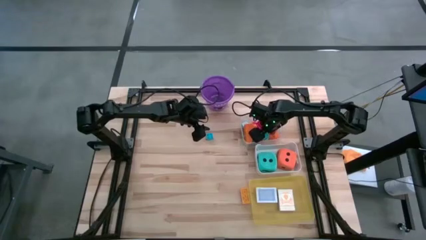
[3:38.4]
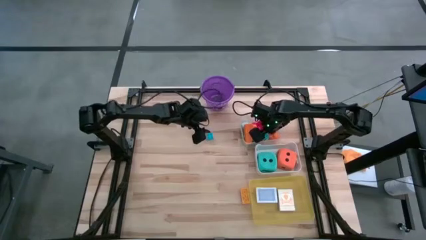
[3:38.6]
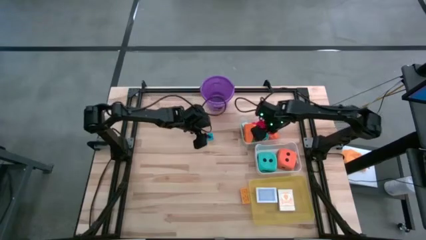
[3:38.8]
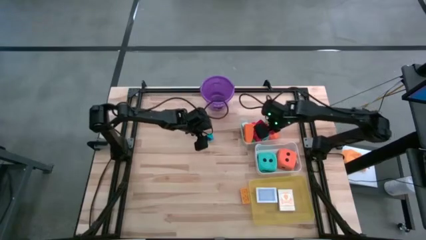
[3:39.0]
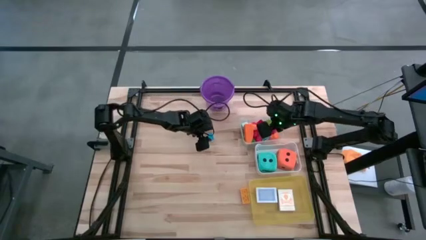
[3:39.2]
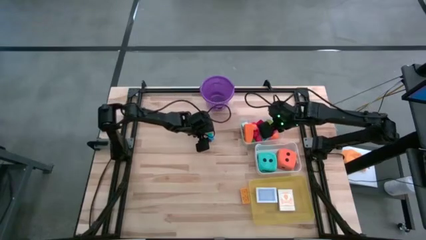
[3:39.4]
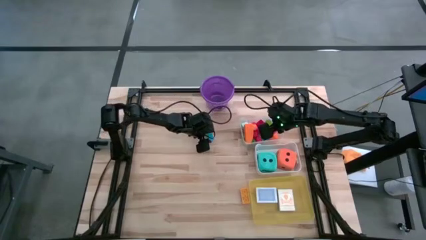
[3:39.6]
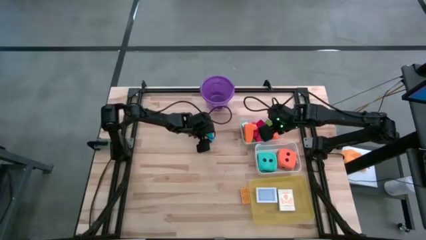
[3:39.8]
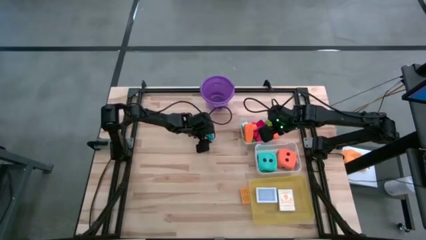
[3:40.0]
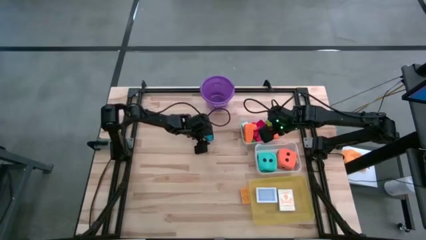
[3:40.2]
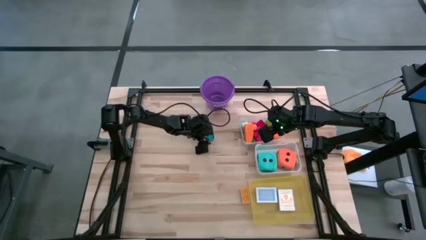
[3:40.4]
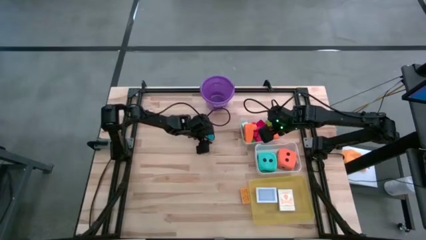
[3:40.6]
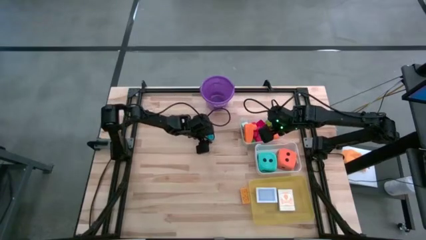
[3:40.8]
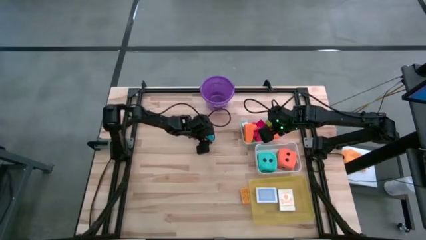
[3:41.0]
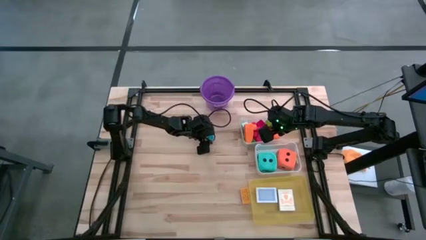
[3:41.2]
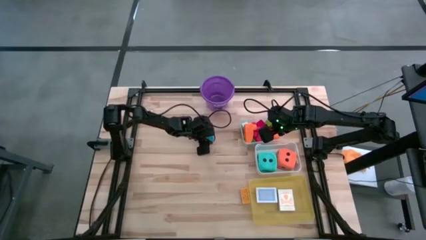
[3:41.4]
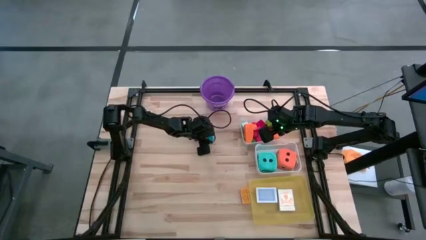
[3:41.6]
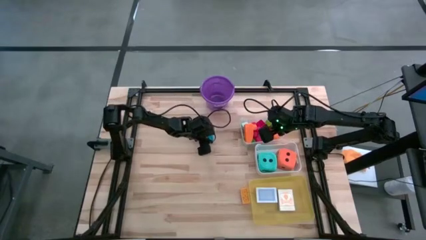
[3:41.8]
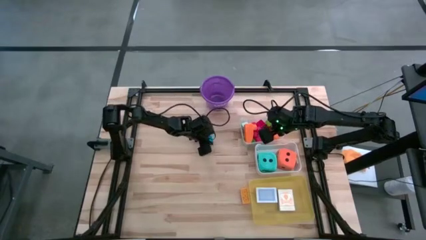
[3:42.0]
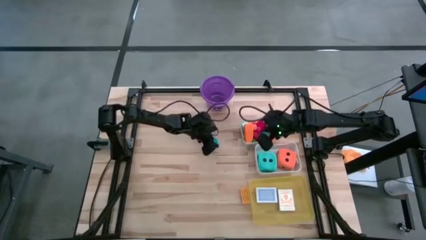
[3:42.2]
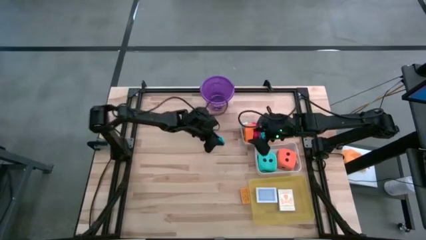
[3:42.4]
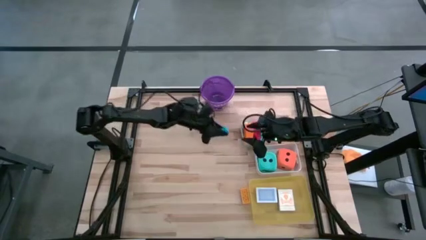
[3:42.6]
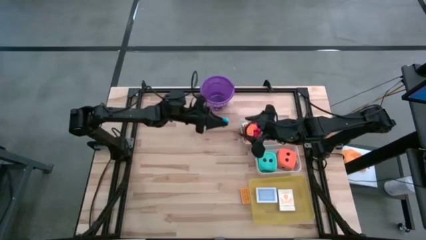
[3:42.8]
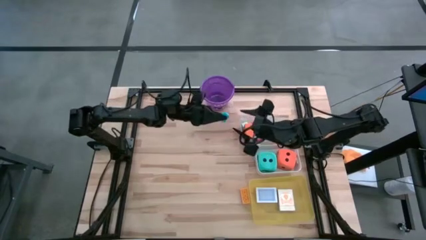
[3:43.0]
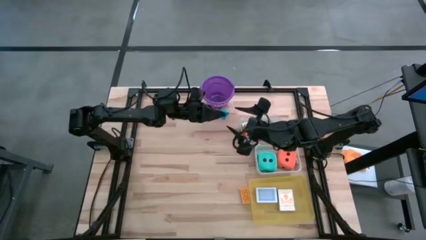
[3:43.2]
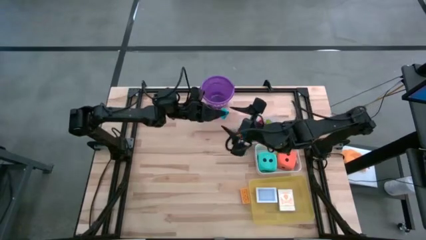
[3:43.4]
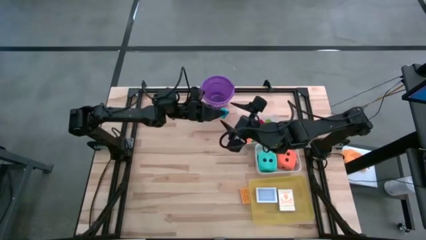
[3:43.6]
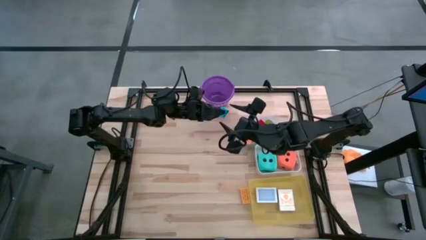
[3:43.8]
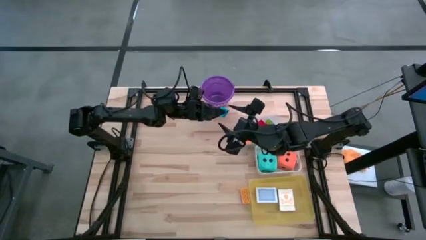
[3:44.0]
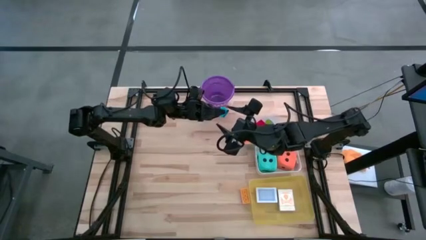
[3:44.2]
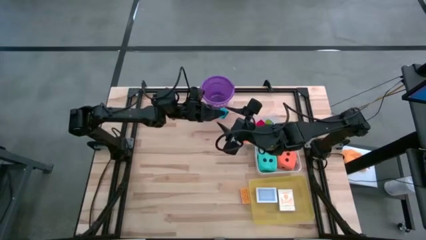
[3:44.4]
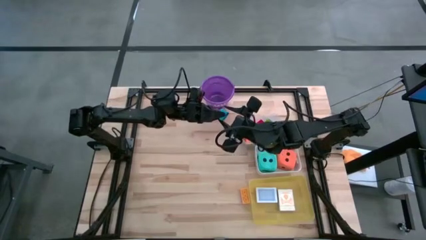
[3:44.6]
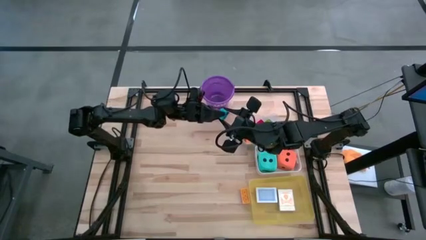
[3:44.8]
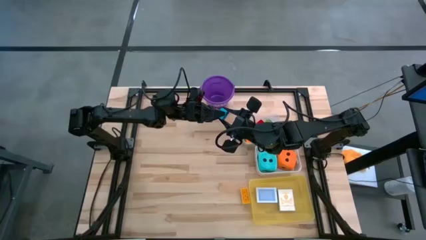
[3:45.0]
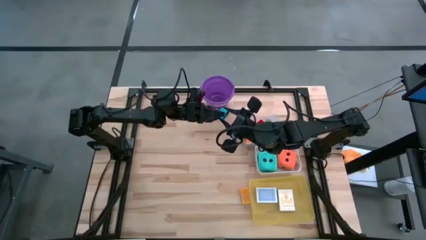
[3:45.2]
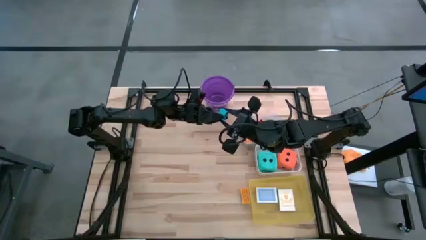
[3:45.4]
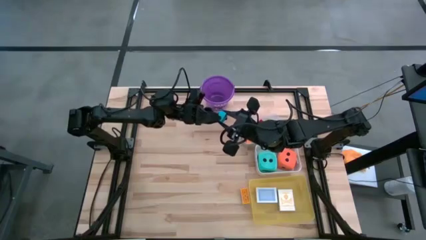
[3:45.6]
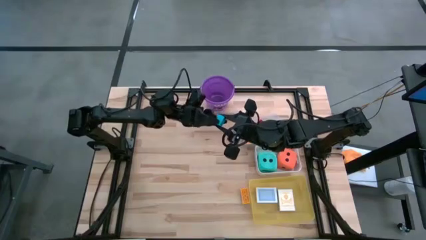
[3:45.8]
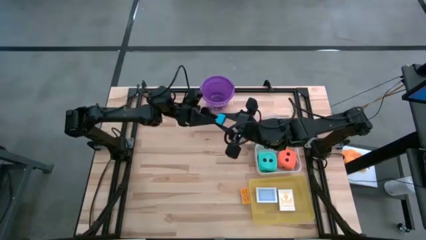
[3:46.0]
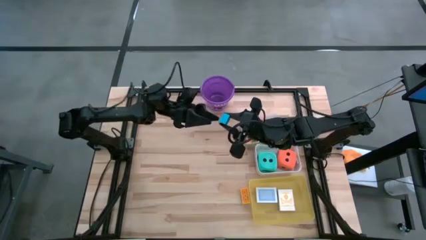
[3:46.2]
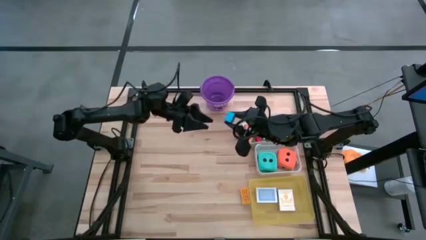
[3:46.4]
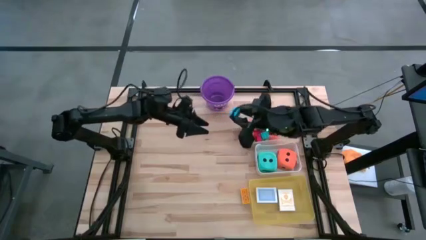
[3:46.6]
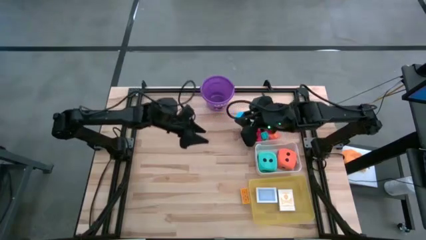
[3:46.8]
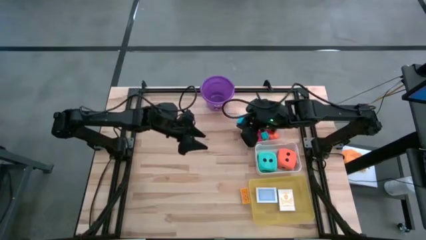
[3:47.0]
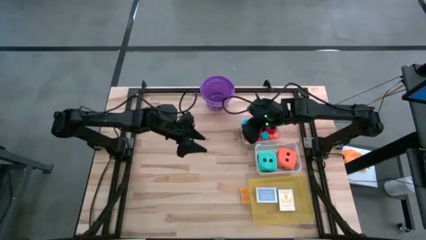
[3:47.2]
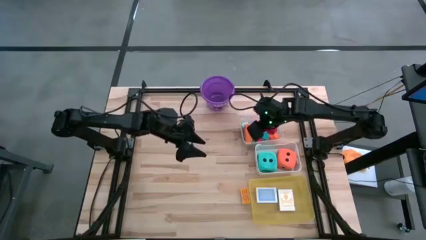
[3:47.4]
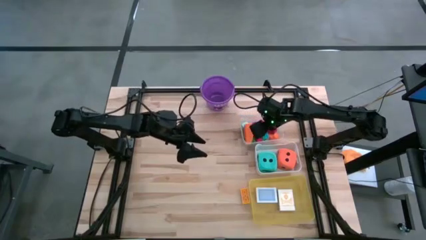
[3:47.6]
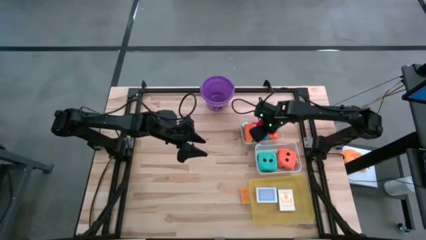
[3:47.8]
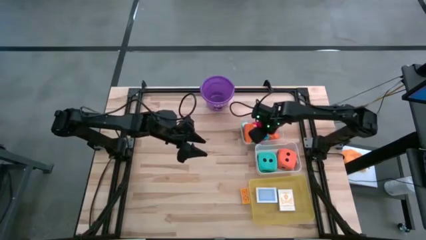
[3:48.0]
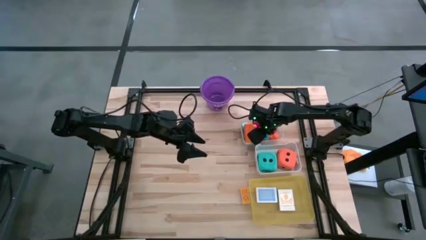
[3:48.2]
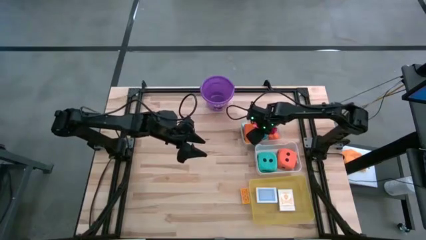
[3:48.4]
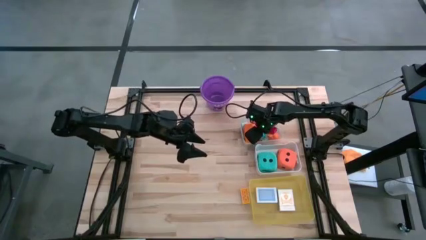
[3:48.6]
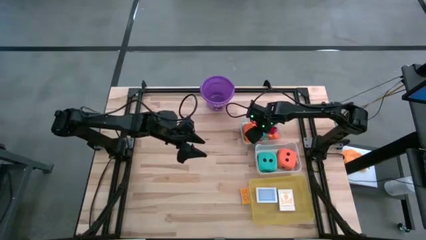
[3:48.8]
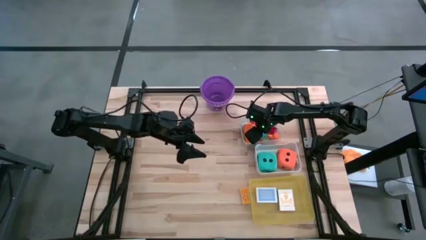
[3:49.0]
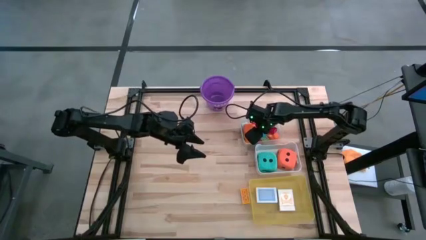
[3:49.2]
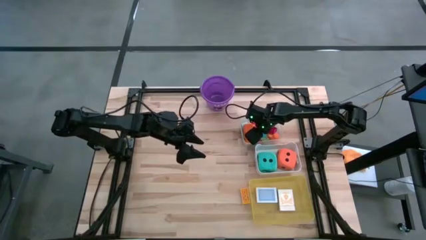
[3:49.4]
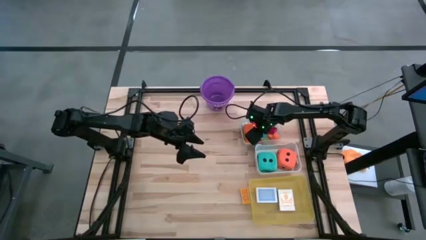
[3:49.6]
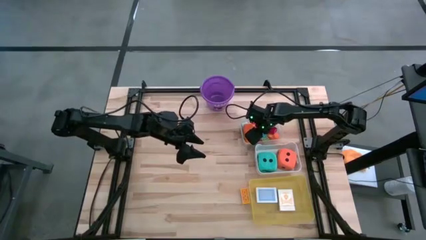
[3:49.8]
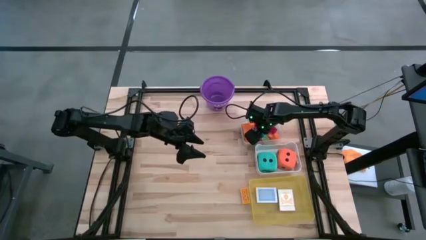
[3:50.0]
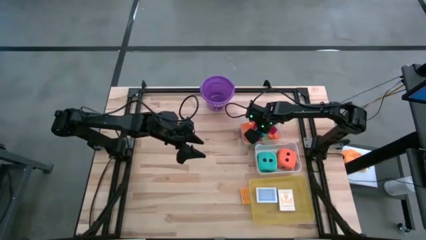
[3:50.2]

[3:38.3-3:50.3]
Task: Pick & Place Toys
Put the blue game piece into the transparent bin

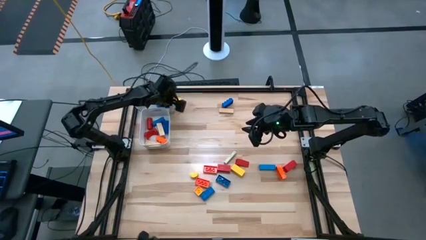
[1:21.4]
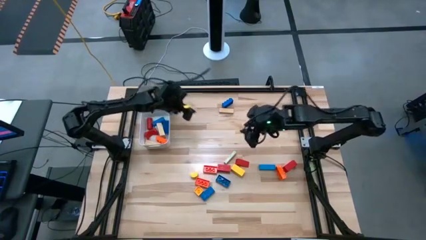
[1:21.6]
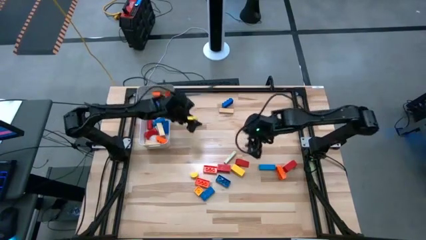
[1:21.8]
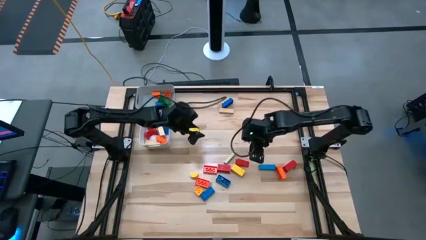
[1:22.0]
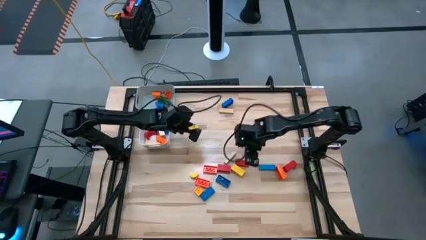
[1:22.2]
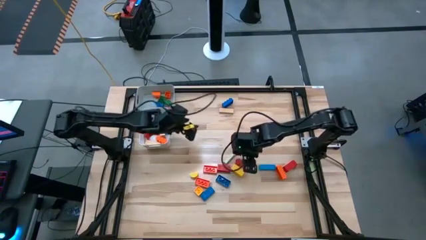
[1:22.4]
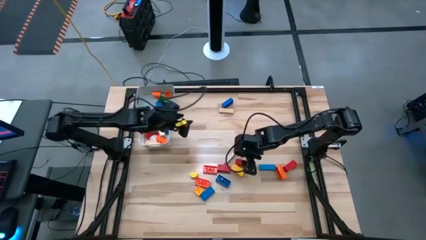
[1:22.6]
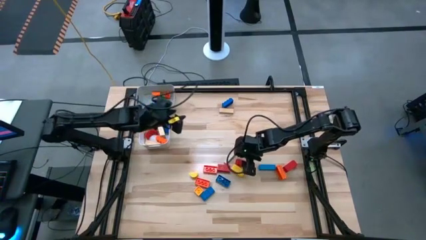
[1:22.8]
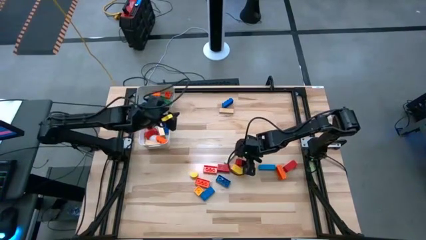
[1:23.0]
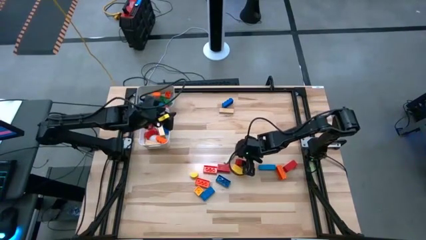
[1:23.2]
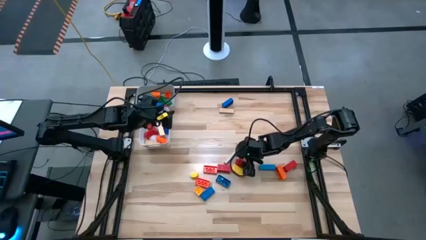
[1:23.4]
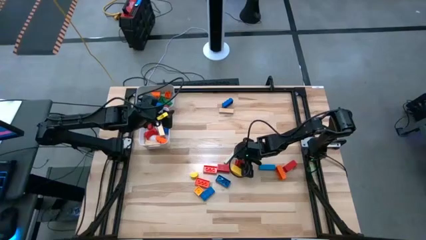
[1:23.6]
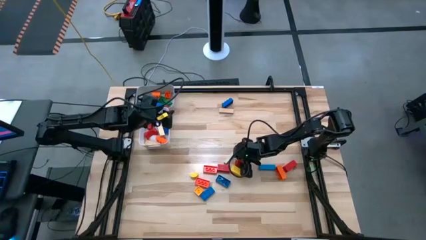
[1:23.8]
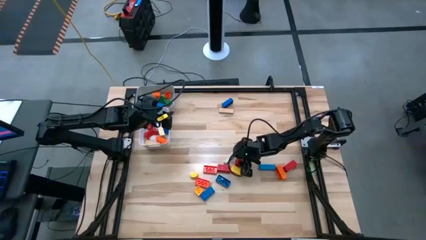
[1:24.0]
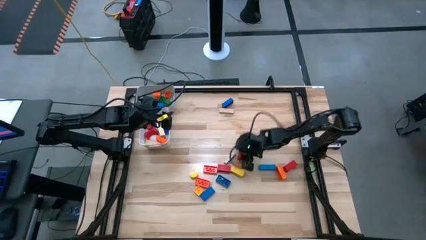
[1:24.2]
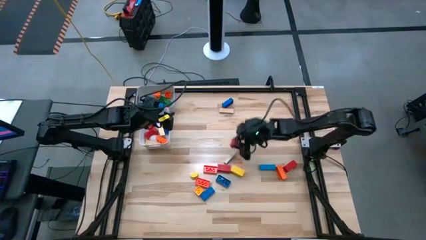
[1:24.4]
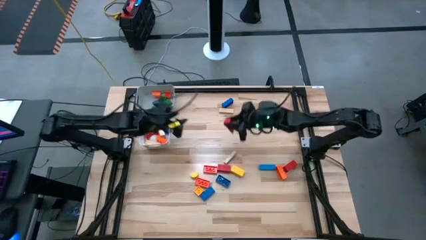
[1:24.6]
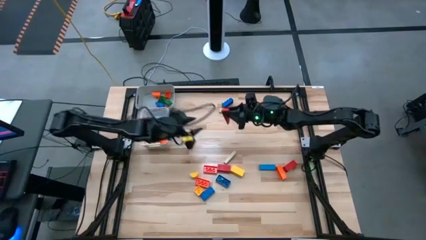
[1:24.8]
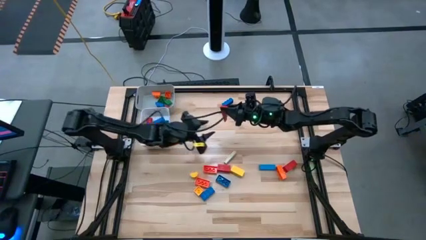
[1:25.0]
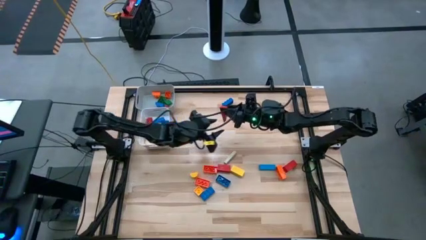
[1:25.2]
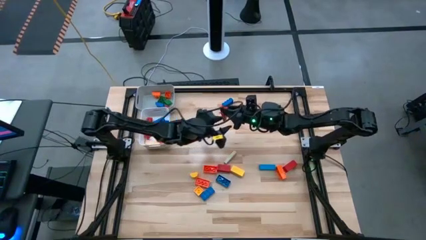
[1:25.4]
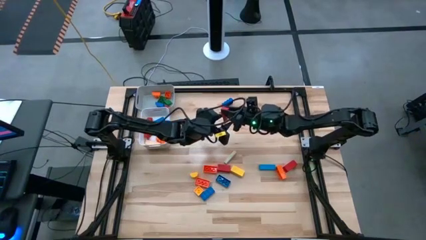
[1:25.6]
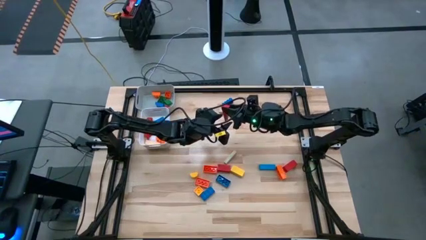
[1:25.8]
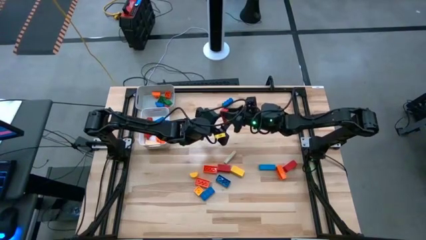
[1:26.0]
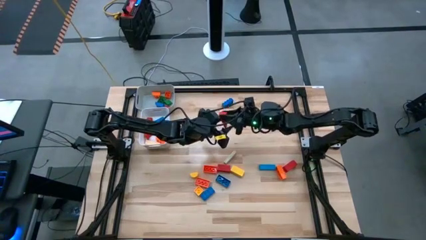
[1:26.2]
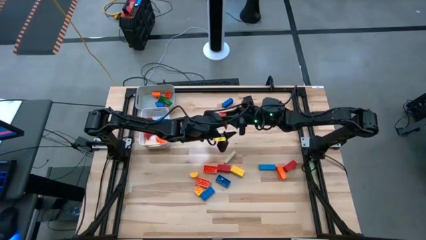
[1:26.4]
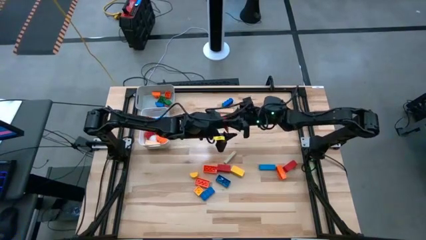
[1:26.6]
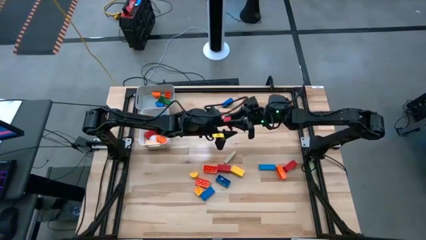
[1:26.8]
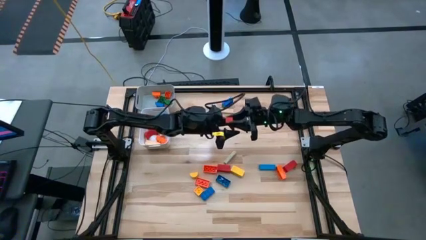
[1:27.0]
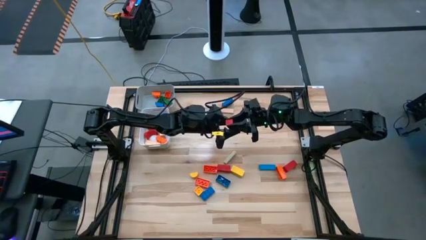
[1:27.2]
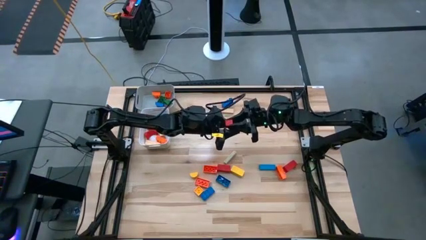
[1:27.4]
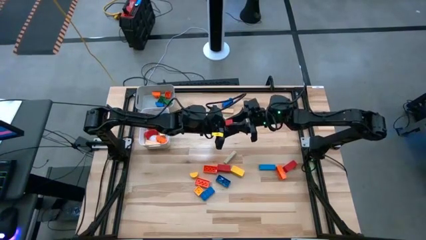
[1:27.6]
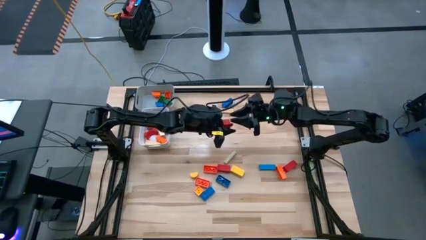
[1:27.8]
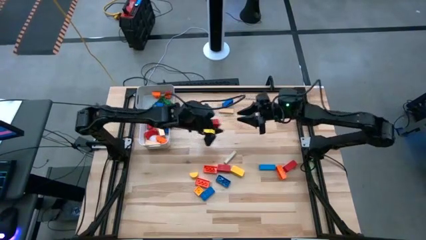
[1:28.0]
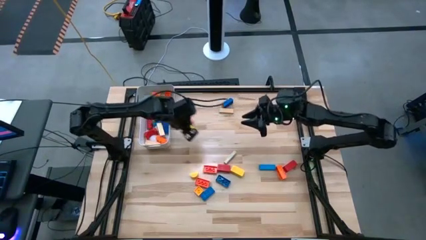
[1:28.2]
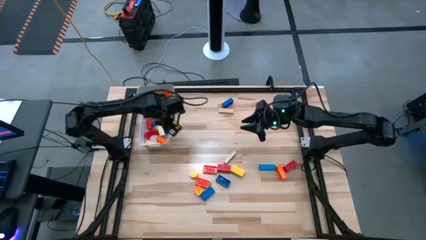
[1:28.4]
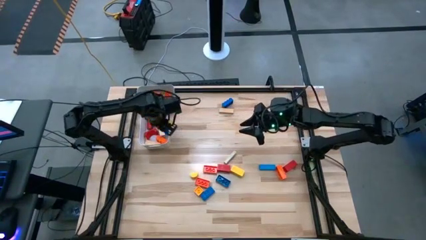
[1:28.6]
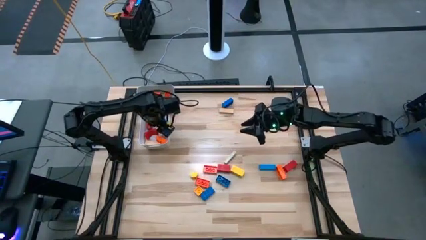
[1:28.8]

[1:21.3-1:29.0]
Task: Sort blocks by size
Put the large red wooden block into the white bin
